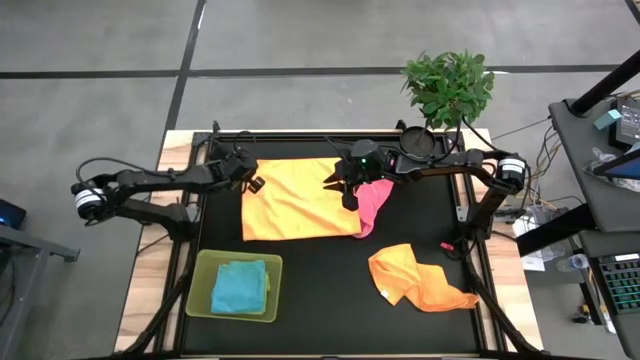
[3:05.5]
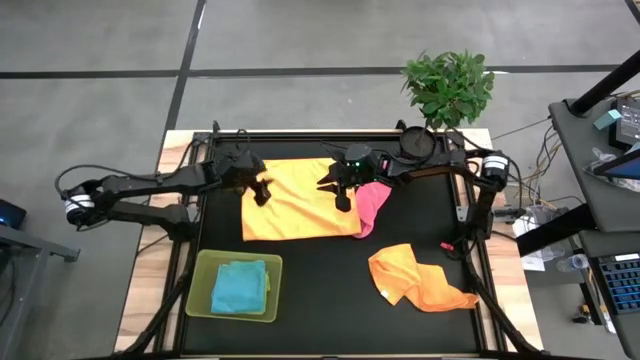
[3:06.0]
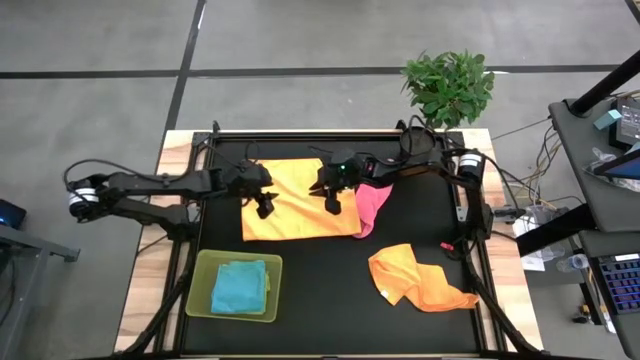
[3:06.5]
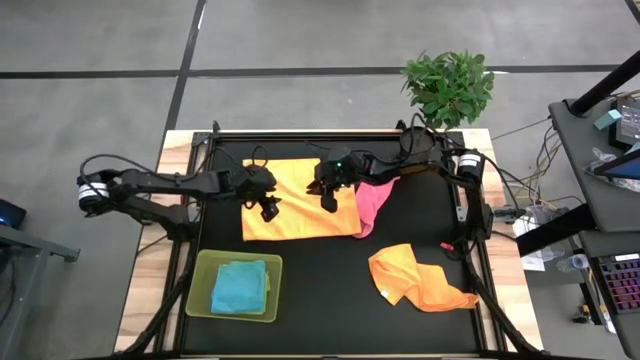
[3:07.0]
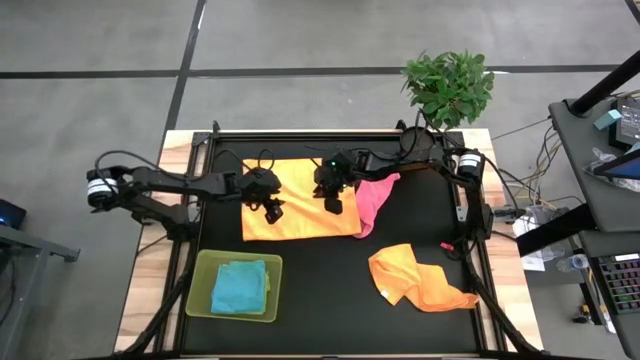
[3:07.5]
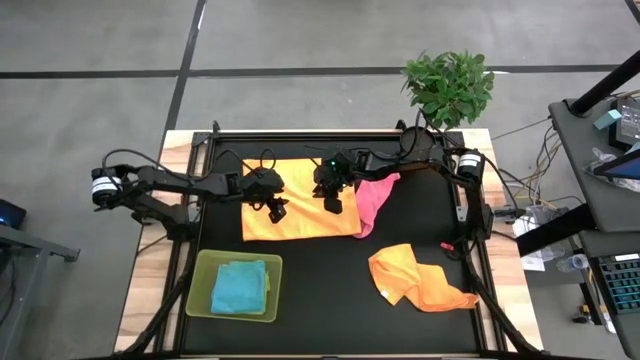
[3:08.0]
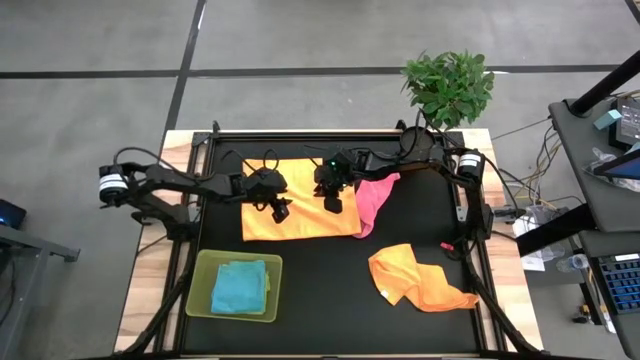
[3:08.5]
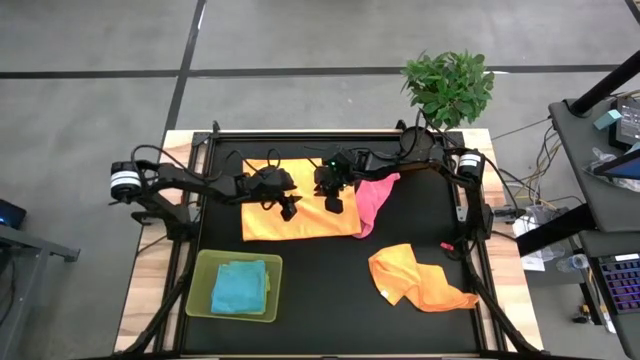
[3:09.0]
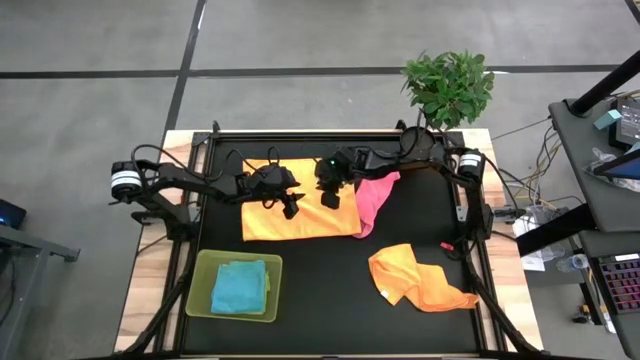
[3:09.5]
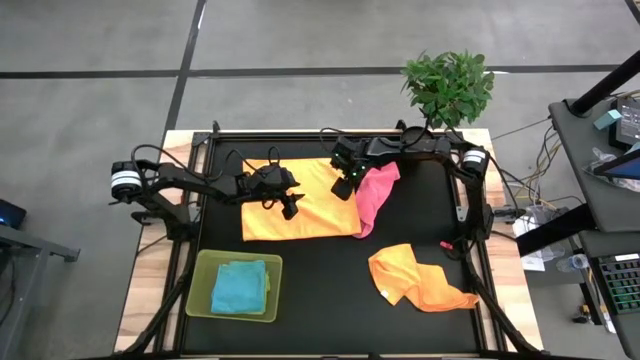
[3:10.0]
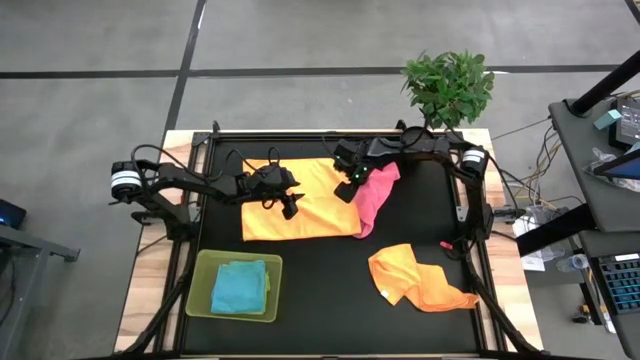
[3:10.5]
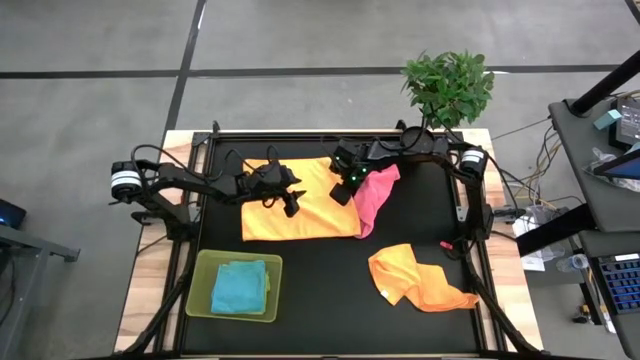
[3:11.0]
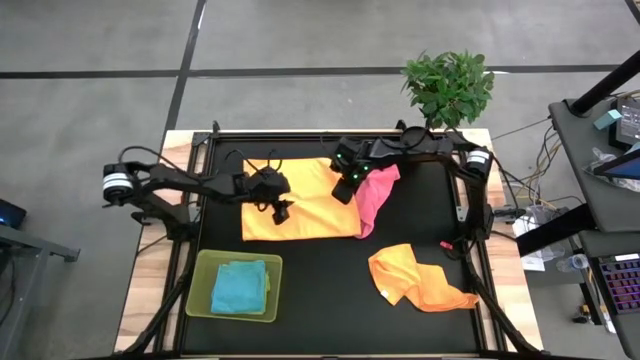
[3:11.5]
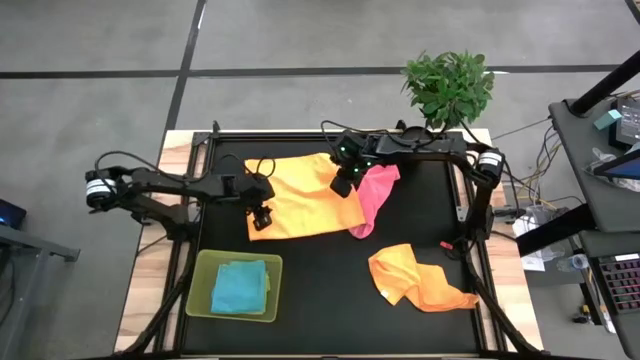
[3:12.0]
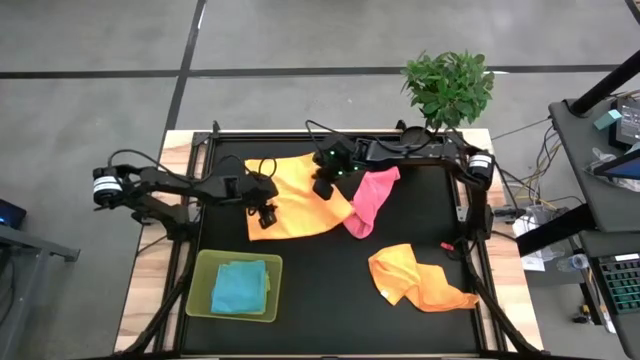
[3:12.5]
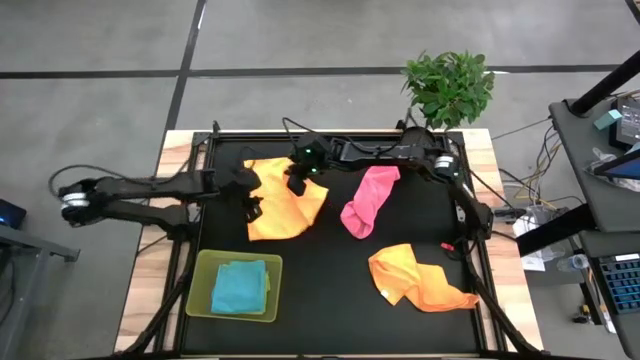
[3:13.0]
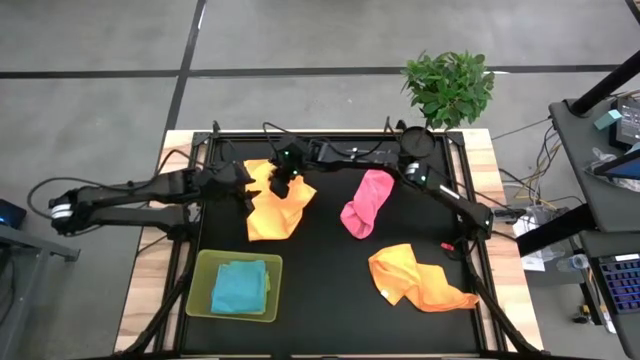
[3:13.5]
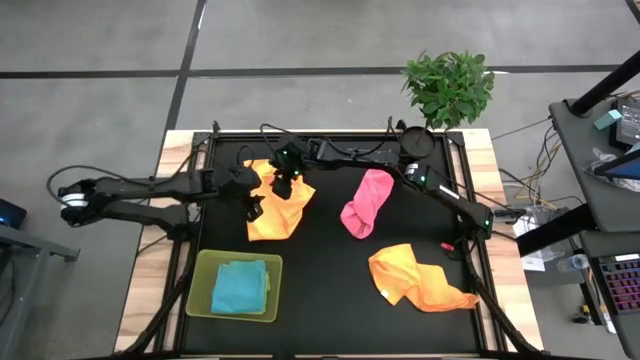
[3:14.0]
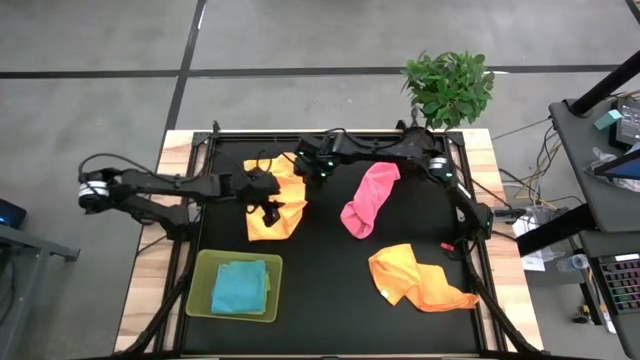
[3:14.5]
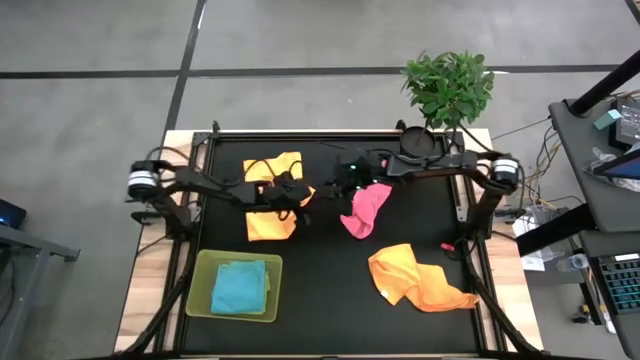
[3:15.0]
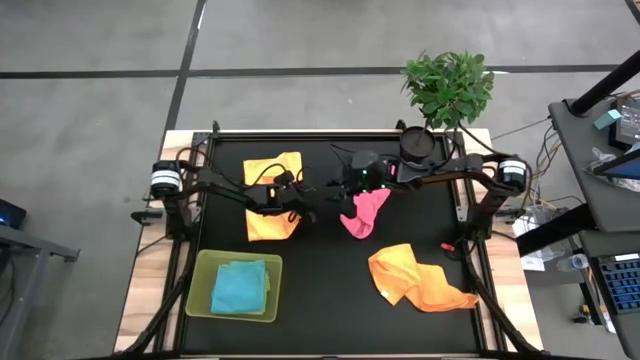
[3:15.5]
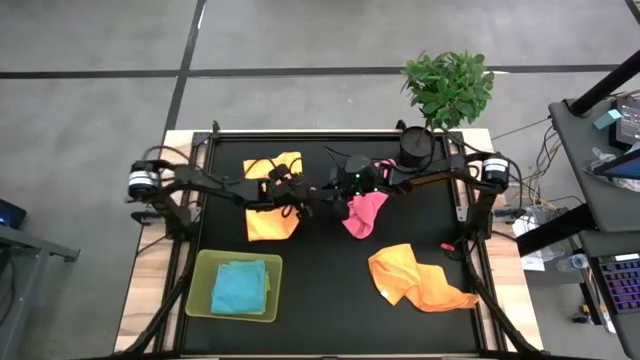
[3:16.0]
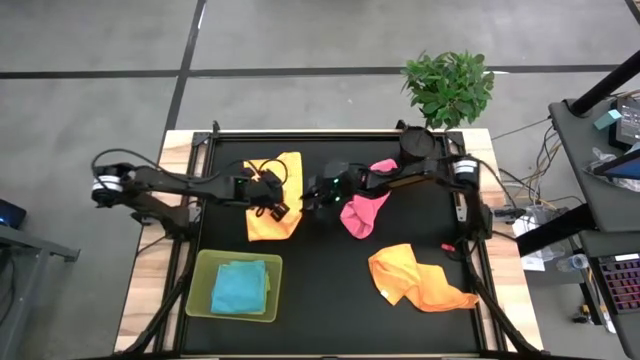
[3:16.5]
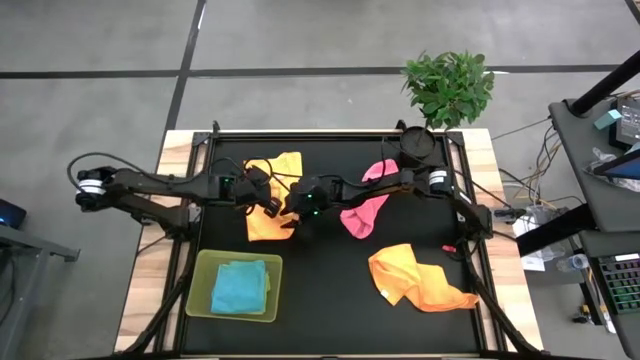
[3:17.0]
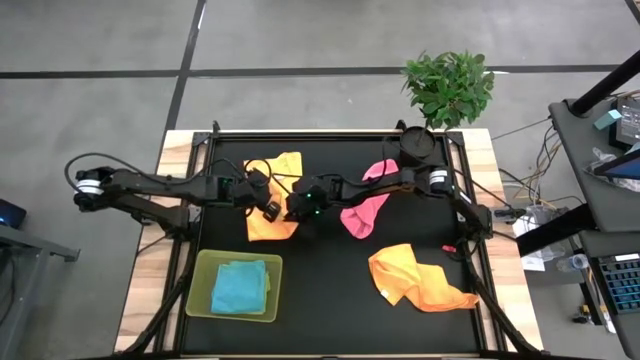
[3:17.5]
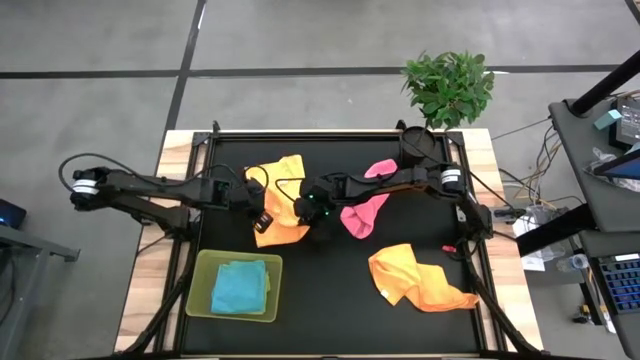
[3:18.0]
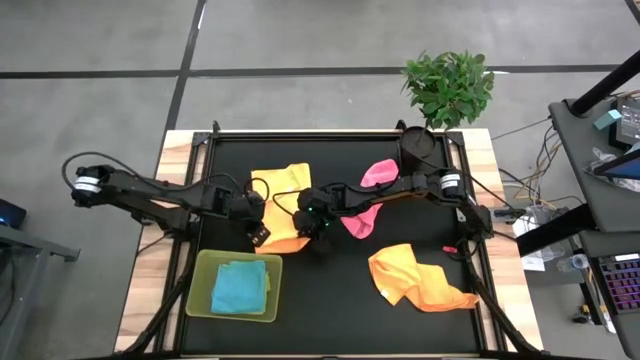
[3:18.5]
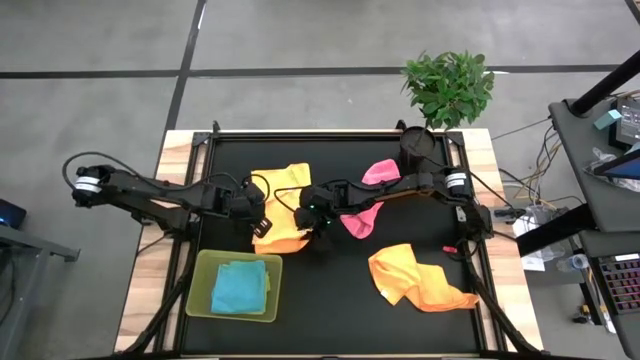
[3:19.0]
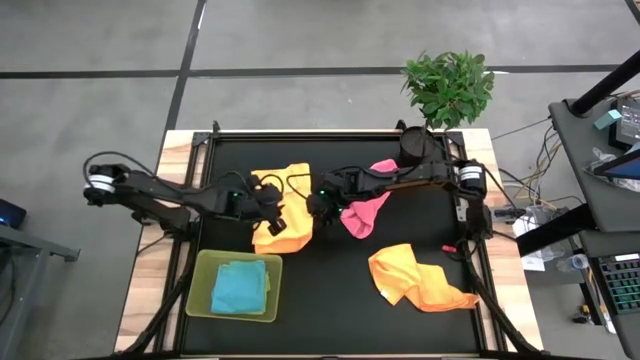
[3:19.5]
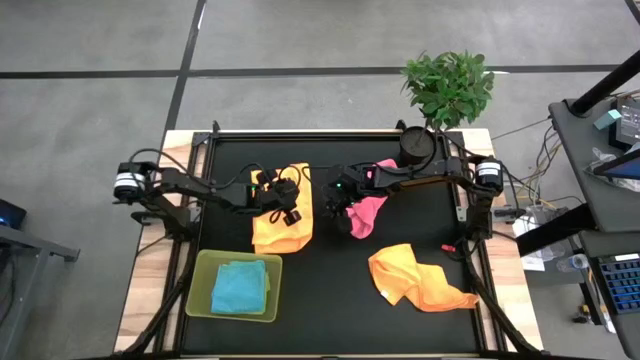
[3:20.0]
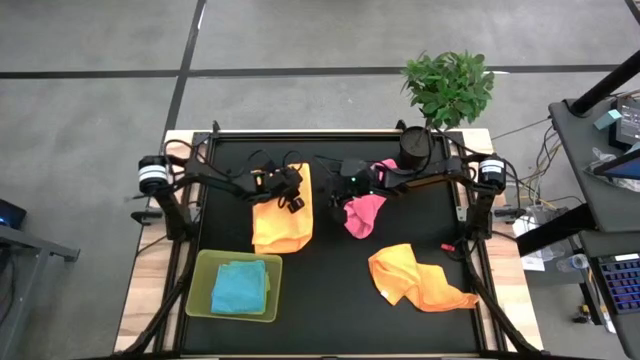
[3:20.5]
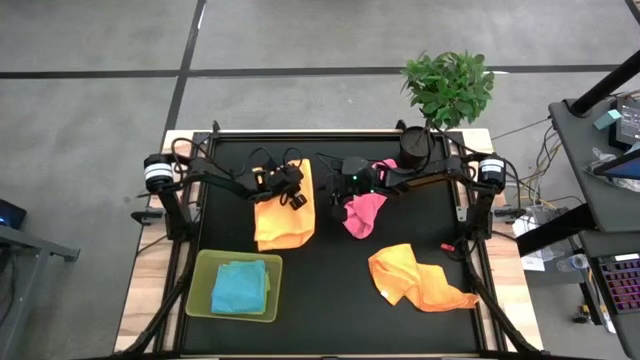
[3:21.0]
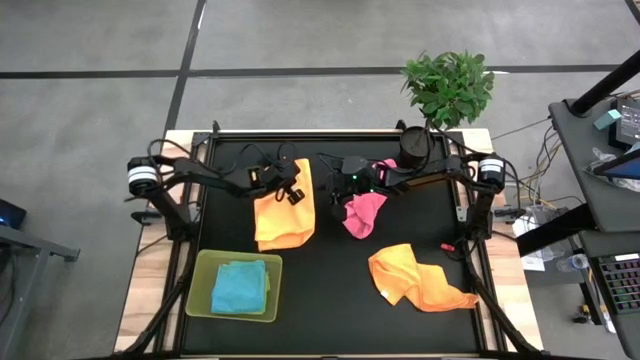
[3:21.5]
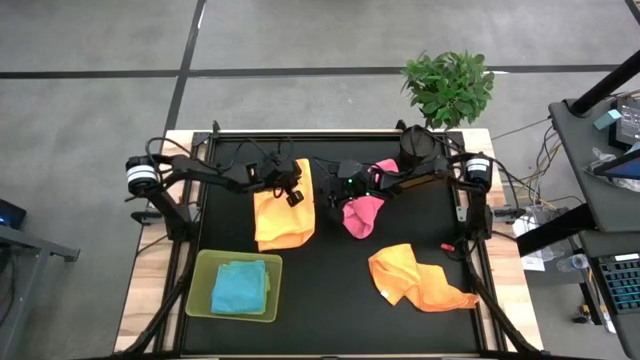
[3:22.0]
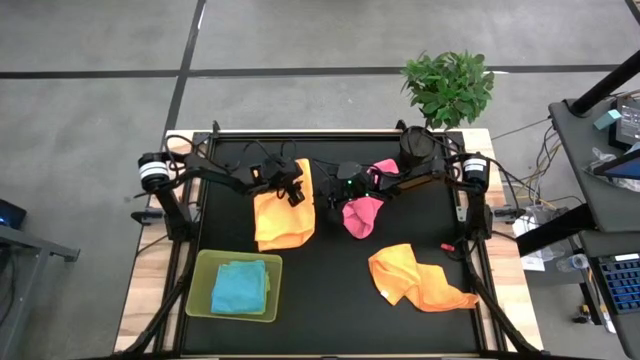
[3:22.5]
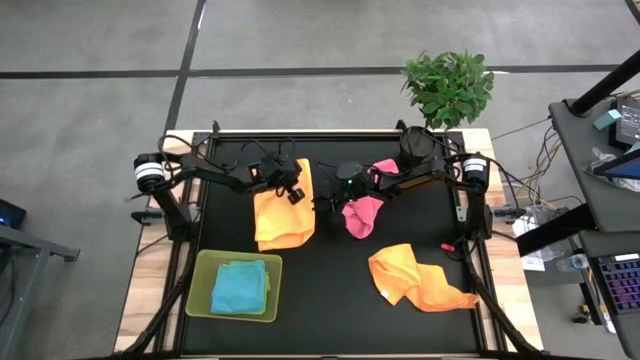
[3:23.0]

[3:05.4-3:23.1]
Task: Fold microfiber towels
Fold the left orange microfiber towel

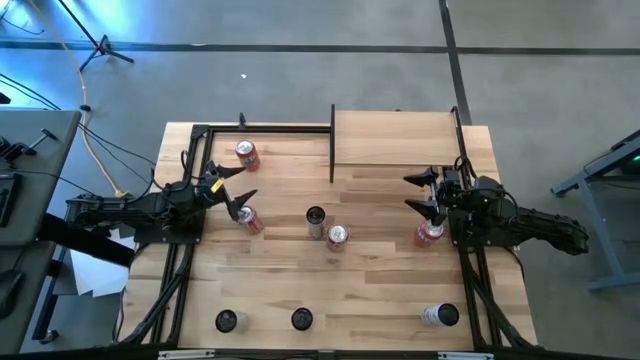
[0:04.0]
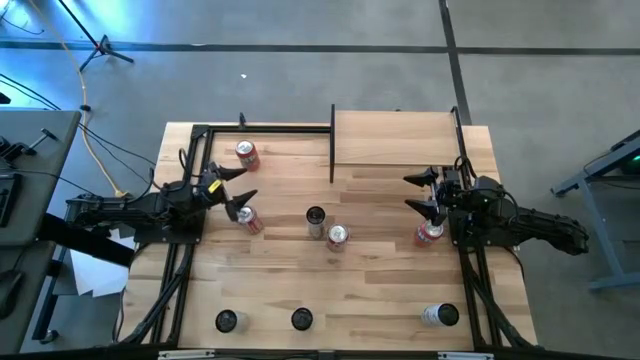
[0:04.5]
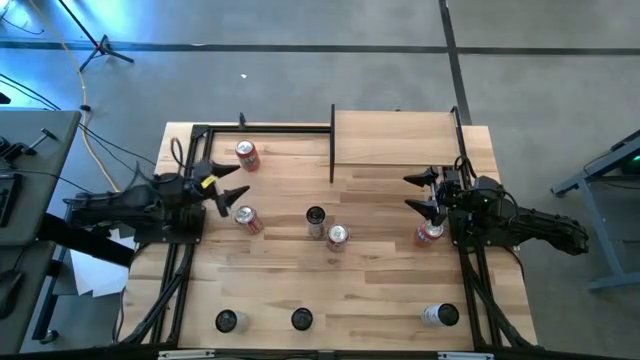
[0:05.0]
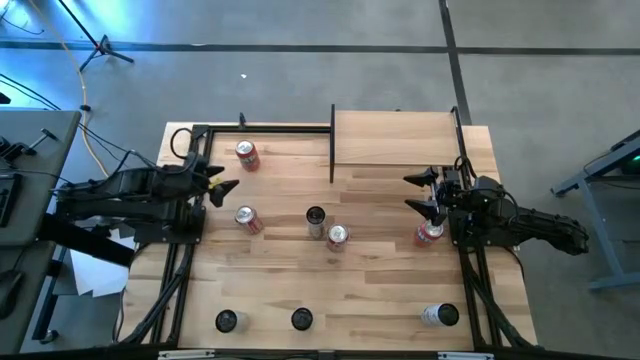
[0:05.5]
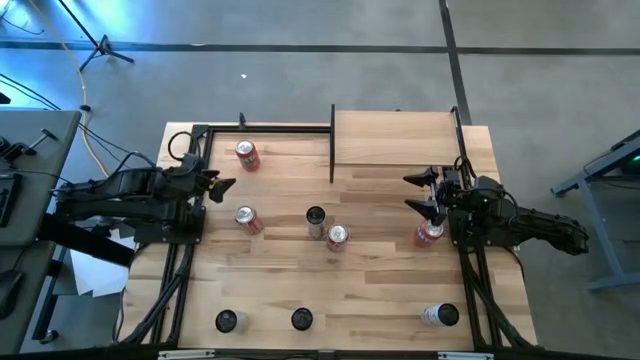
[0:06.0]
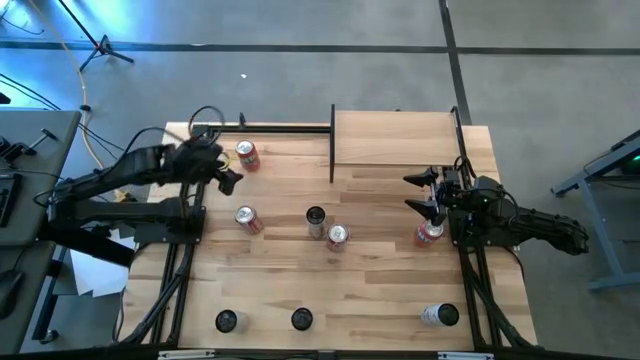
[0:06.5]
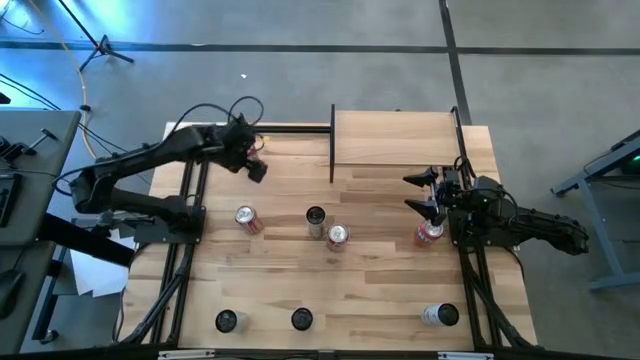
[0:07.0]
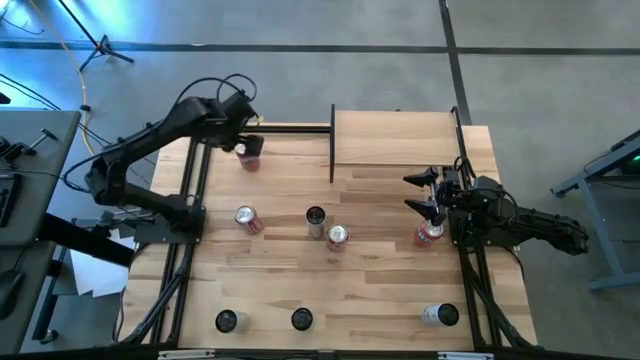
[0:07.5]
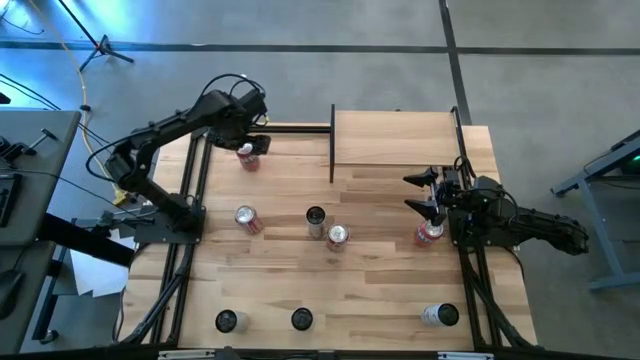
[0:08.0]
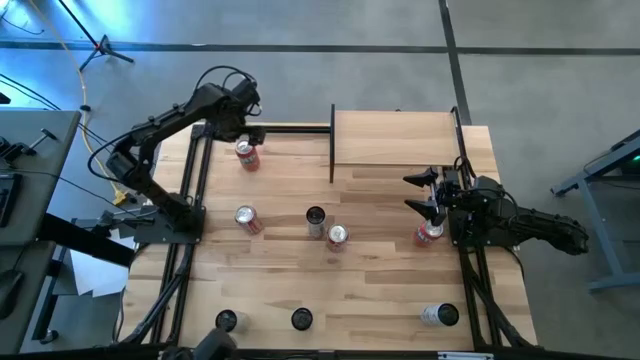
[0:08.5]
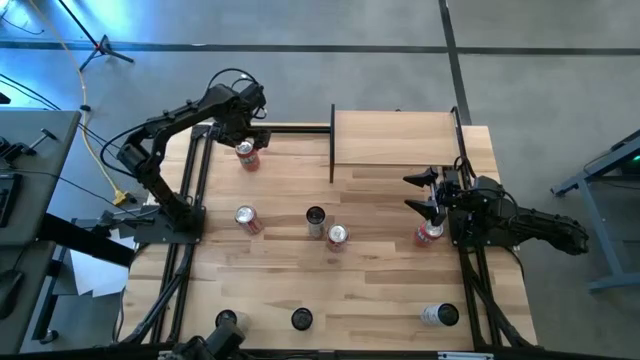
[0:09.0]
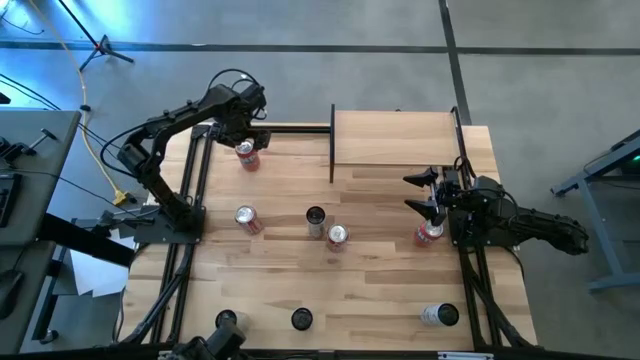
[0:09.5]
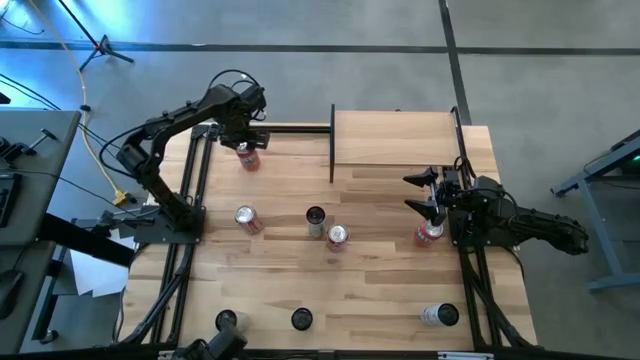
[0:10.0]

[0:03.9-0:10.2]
Task: Place canned beverage on shelf
Move the left red soda can to the middle of the table
